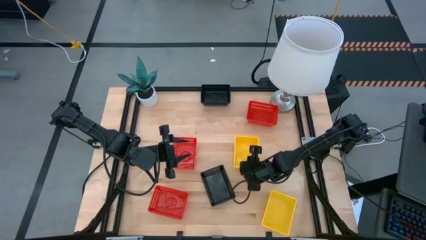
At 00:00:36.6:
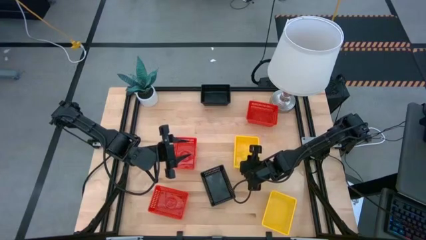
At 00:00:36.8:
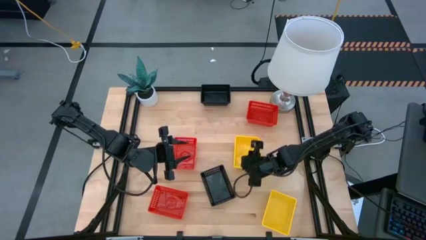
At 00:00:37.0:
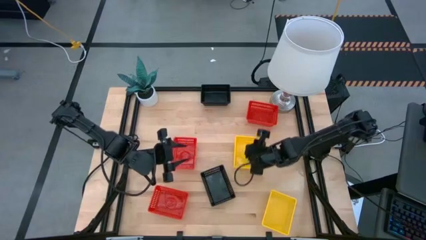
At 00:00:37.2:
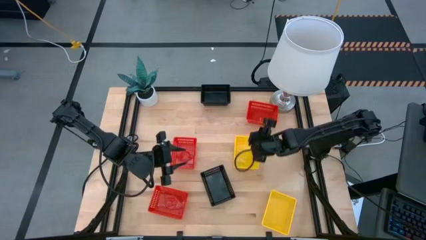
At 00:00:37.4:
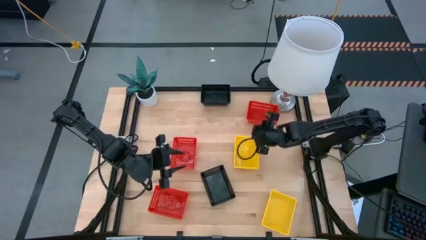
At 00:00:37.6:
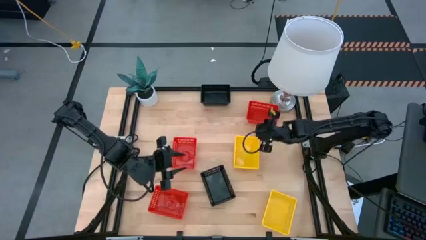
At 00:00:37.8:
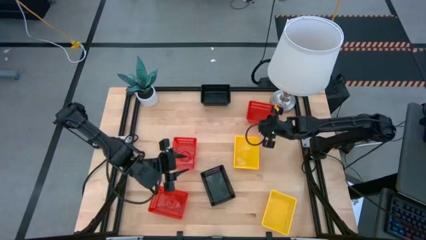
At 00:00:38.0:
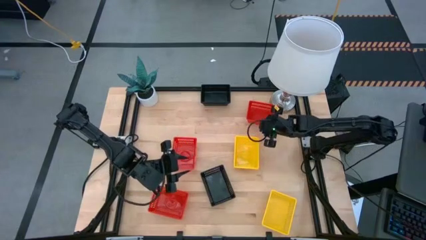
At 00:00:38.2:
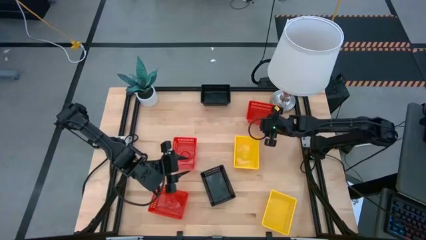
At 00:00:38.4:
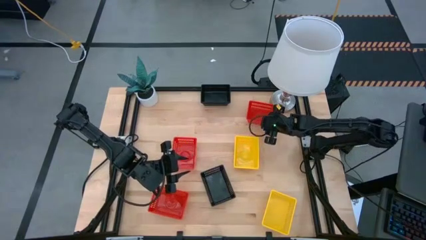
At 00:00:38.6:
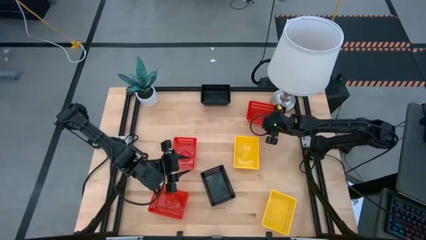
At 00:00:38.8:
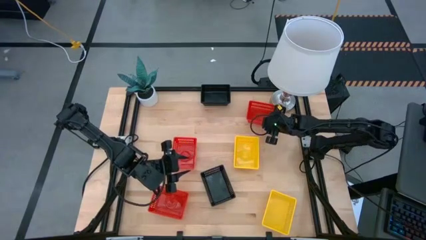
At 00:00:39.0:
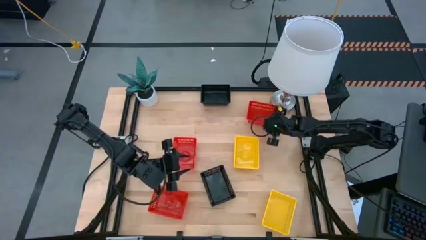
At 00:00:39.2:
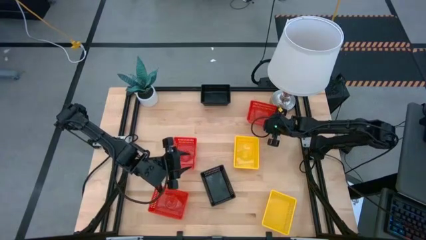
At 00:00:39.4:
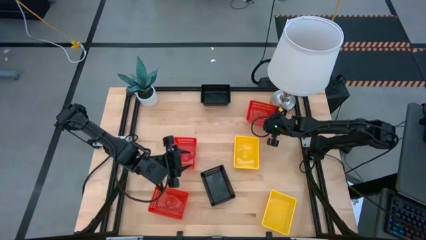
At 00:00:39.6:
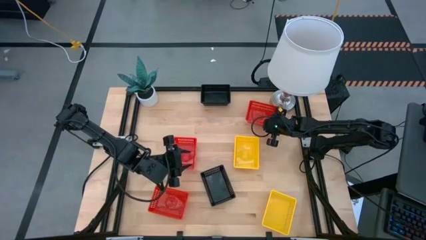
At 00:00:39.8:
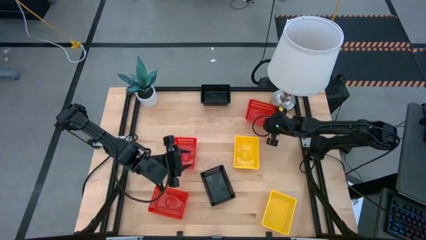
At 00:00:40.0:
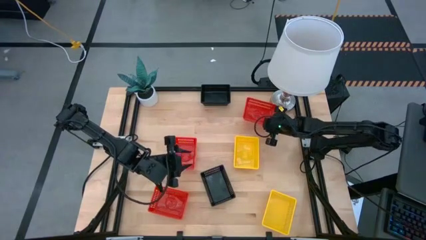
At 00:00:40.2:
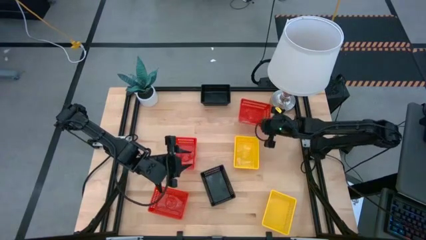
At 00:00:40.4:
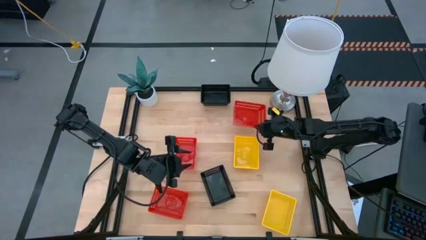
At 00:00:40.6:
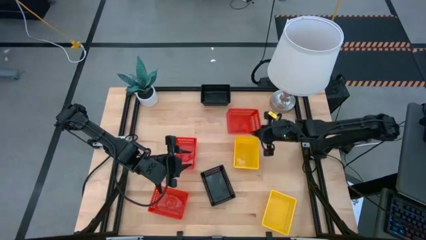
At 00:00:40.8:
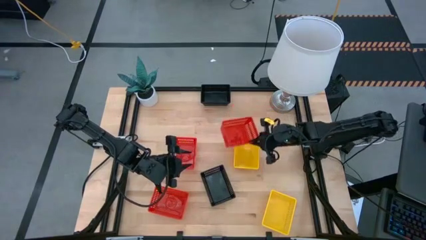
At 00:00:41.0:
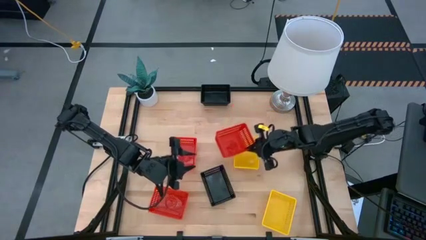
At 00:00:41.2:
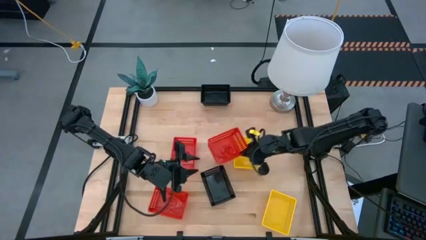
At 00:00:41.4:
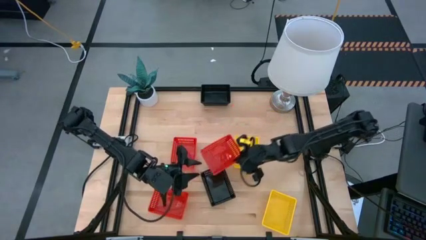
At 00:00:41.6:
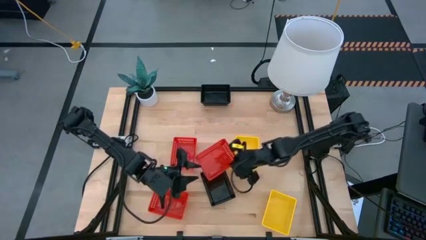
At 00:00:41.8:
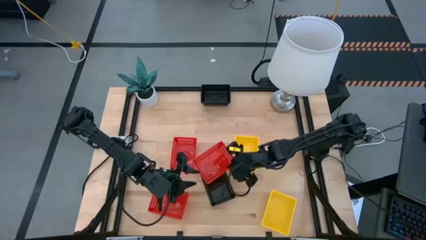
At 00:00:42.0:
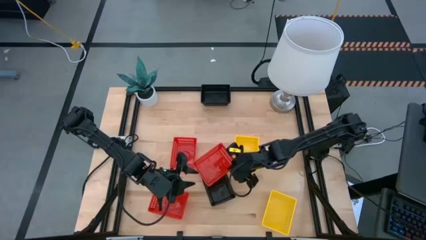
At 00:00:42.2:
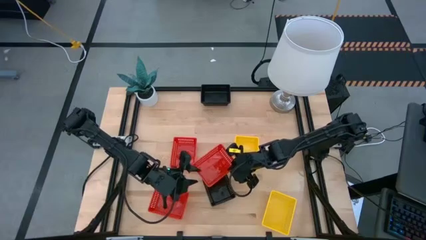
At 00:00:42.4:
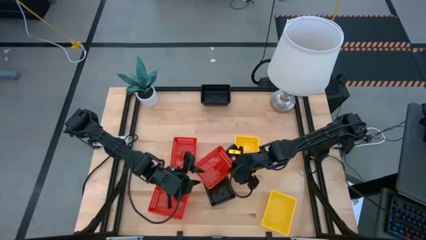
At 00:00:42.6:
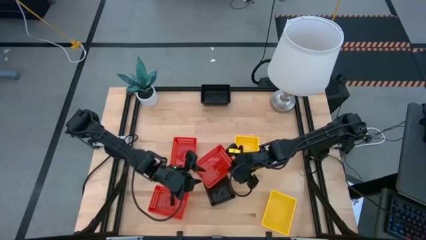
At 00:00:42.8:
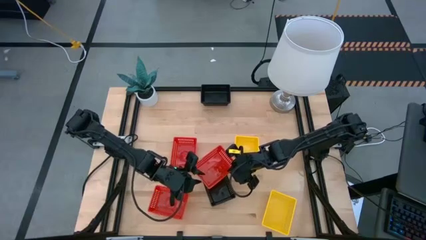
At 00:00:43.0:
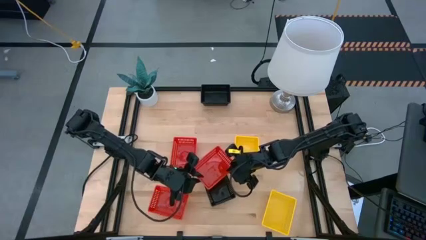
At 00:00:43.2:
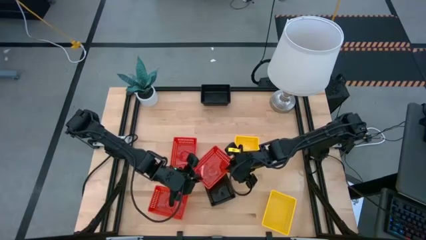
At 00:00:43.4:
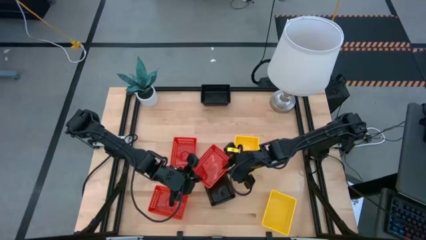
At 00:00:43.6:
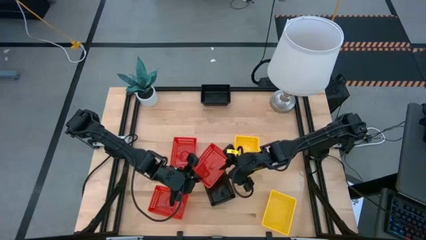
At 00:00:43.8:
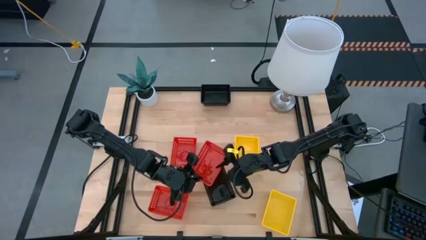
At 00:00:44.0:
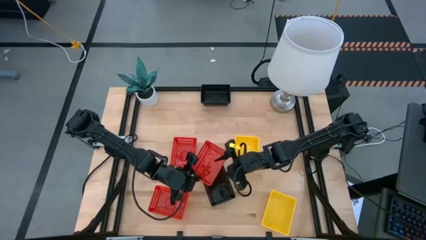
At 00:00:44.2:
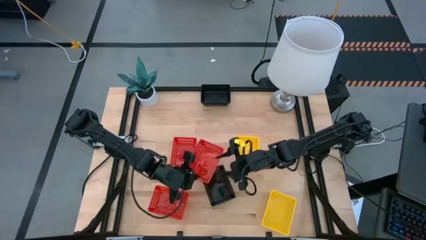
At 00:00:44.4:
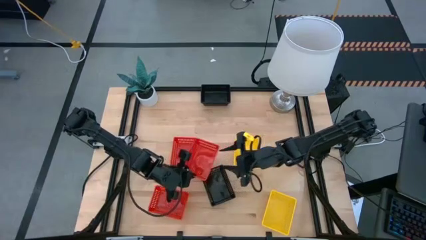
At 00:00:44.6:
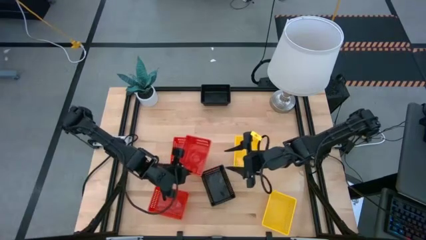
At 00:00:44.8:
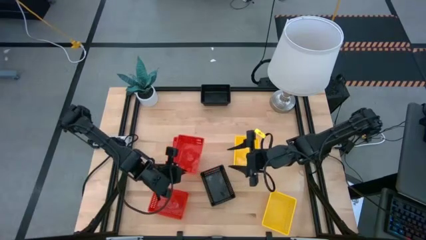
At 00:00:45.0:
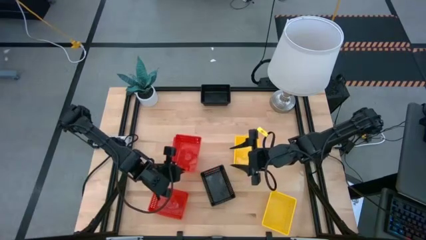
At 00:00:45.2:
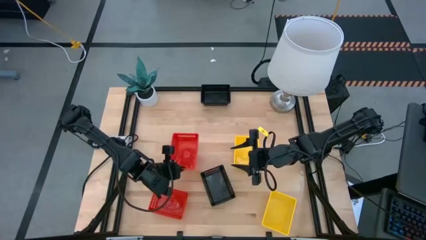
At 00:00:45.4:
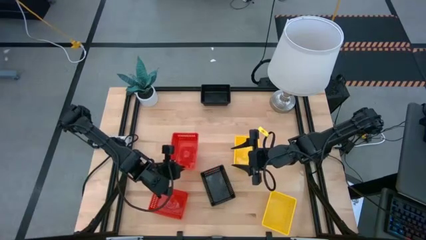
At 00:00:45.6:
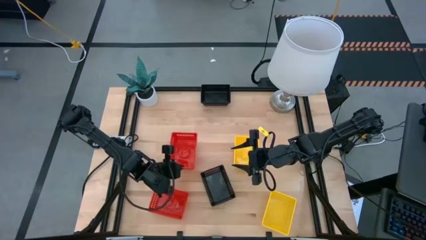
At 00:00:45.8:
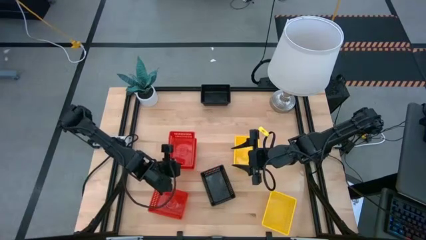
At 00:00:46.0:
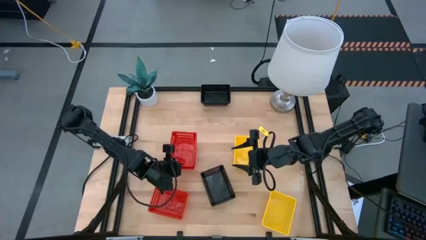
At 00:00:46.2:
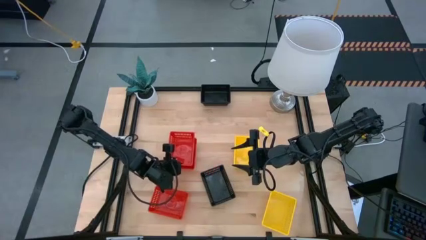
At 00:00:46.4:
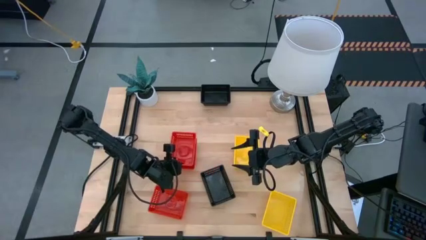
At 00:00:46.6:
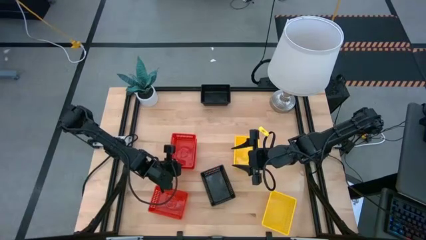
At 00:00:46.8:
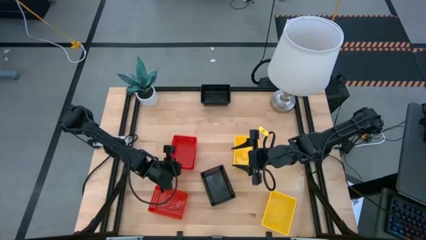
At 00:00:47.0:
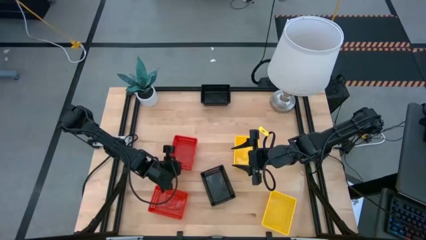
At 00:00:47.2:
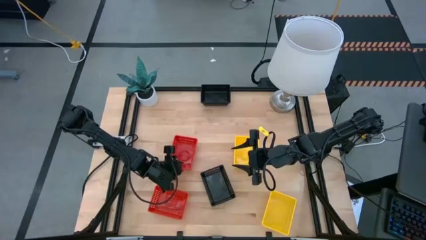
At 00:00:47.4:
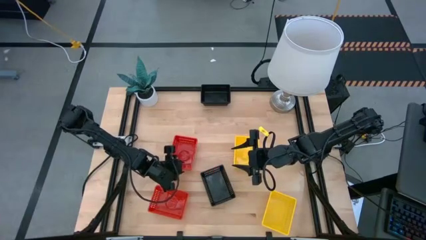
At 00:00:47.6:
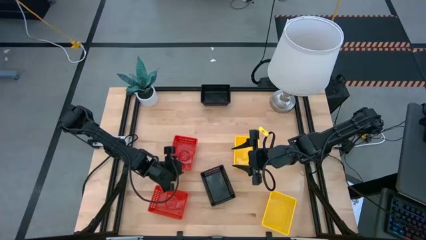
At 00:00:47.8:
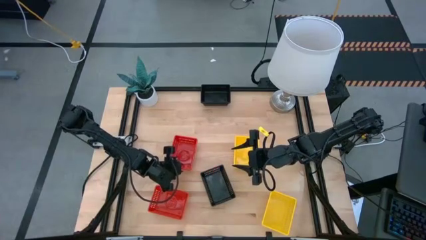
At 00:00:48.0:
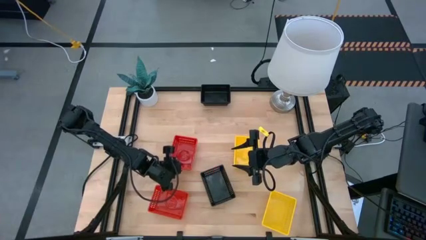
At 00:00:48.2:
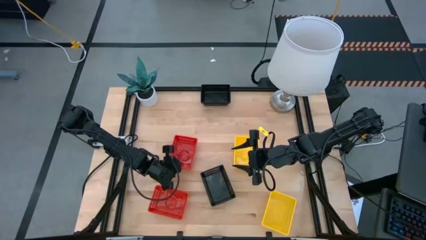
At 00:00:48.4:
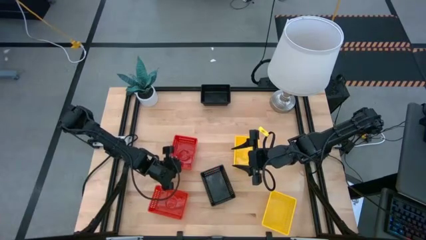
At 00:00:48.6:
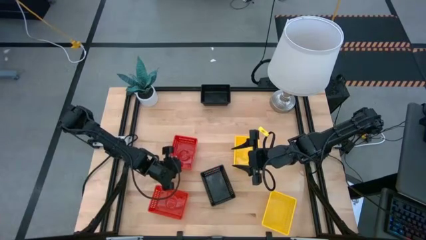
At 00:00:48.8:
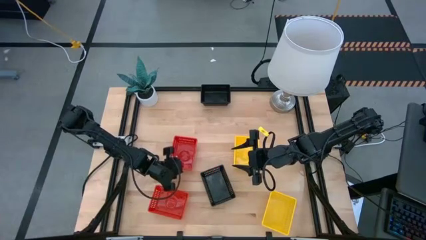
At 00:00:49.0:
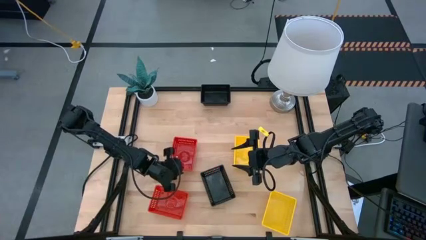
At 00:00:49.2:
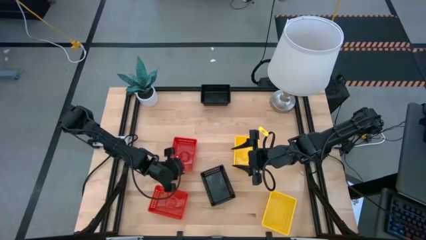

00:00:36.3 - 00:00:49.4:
Stack the top red basket on the middle red basket
